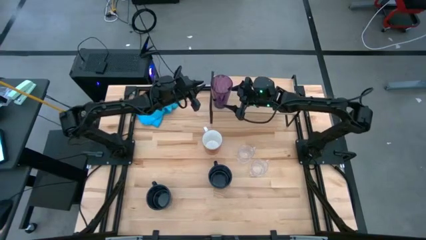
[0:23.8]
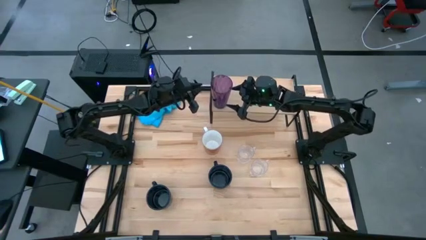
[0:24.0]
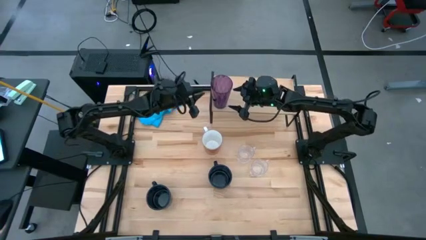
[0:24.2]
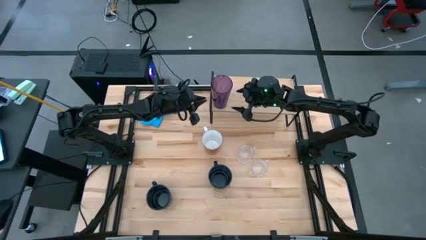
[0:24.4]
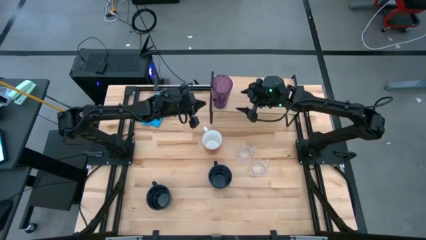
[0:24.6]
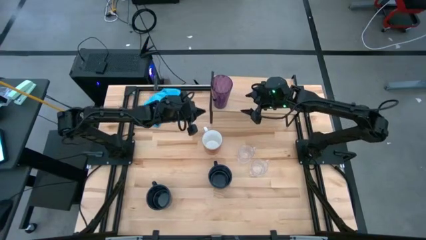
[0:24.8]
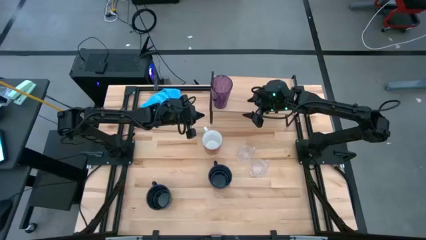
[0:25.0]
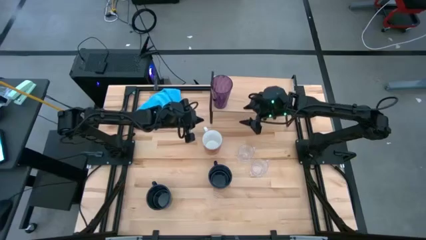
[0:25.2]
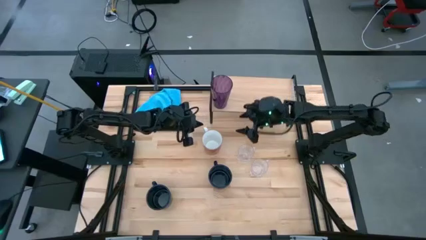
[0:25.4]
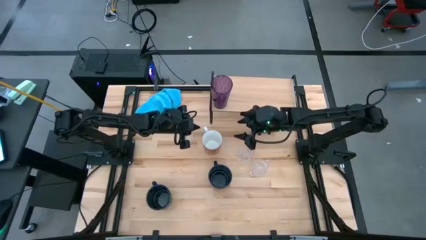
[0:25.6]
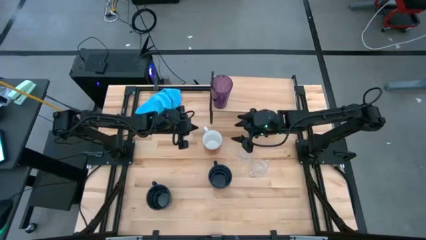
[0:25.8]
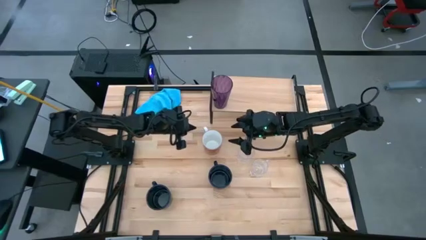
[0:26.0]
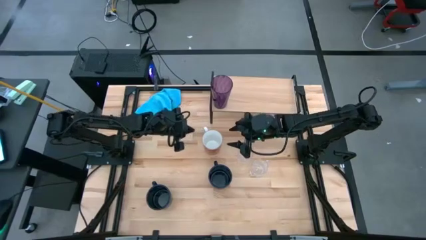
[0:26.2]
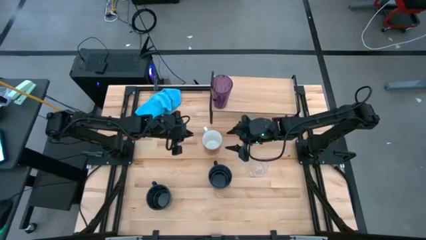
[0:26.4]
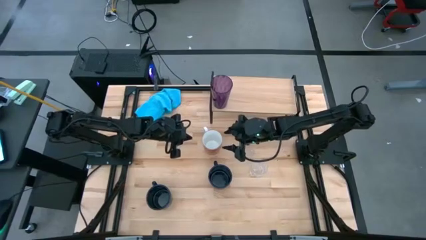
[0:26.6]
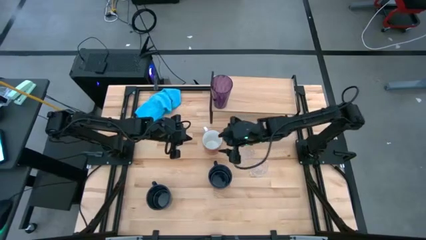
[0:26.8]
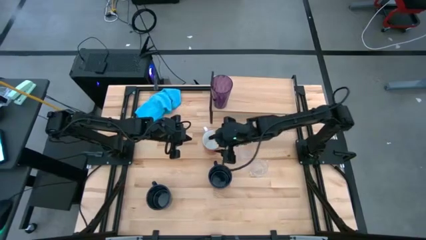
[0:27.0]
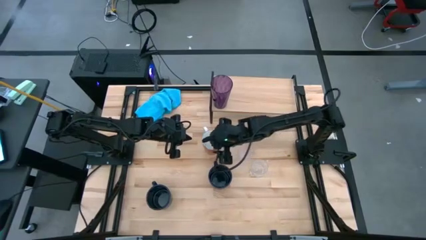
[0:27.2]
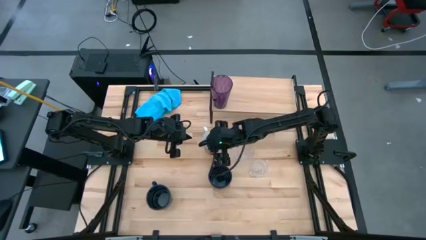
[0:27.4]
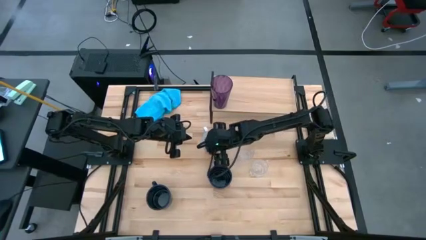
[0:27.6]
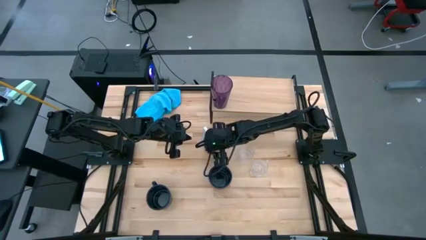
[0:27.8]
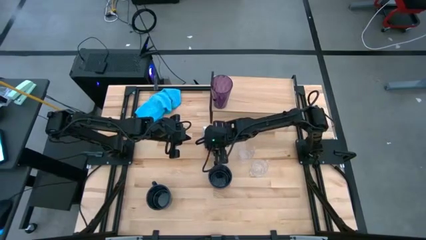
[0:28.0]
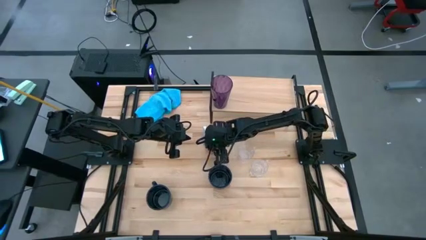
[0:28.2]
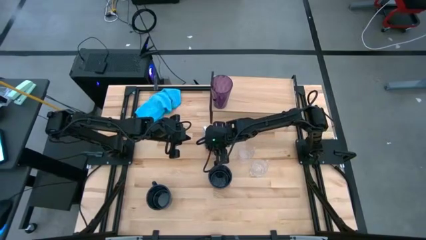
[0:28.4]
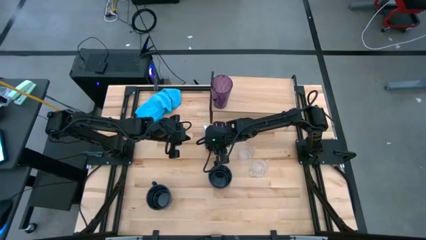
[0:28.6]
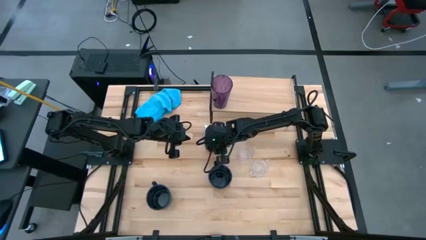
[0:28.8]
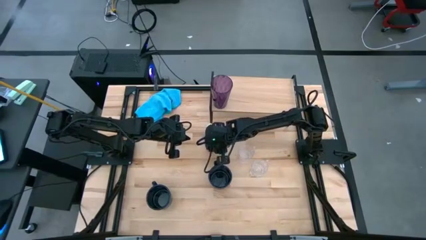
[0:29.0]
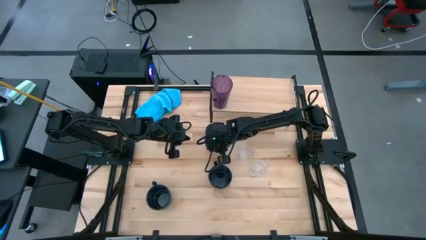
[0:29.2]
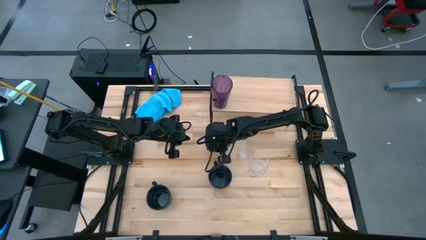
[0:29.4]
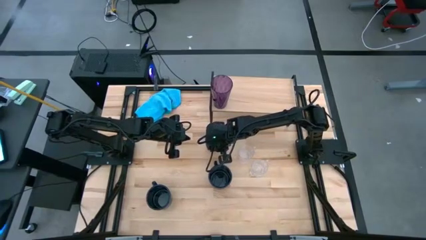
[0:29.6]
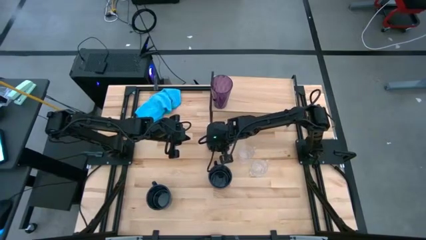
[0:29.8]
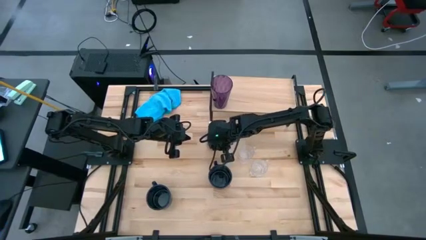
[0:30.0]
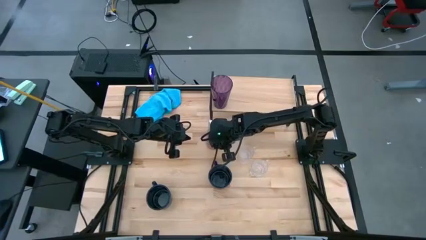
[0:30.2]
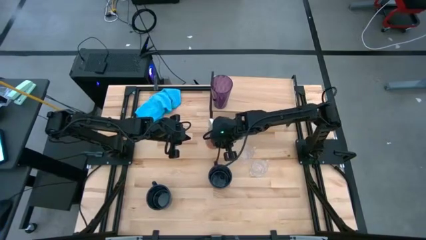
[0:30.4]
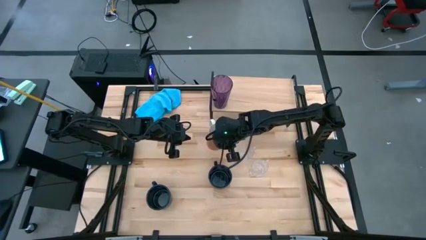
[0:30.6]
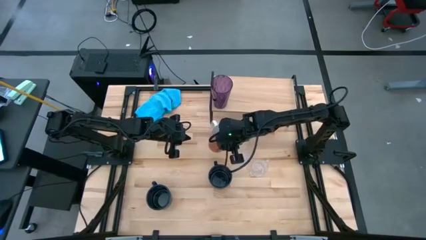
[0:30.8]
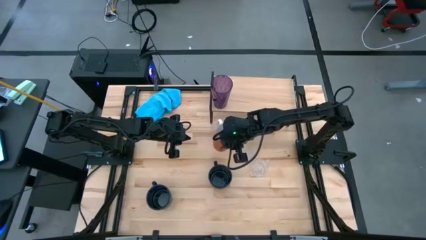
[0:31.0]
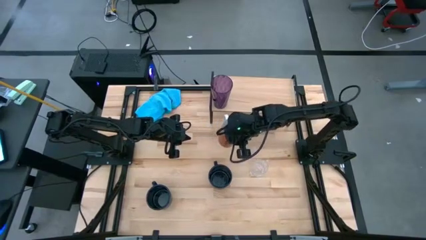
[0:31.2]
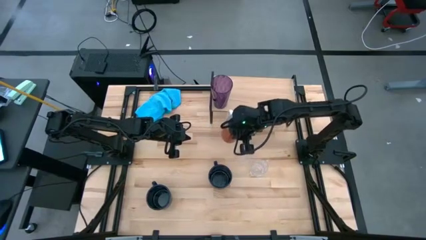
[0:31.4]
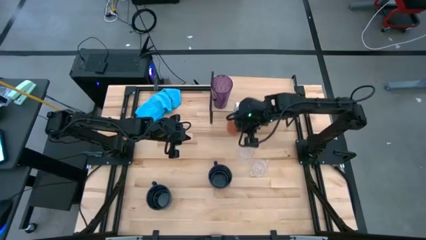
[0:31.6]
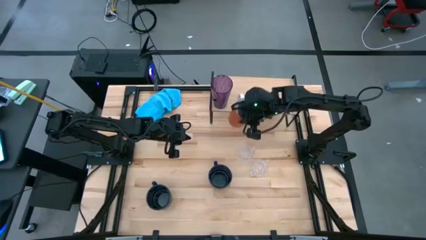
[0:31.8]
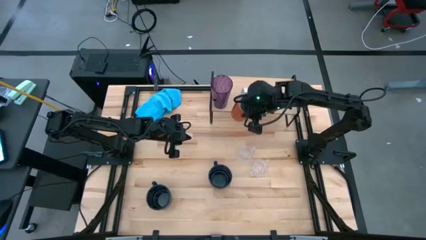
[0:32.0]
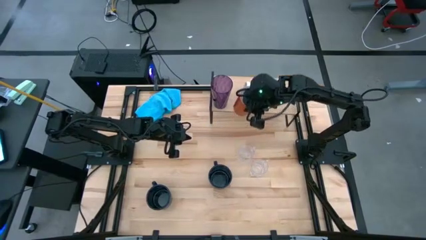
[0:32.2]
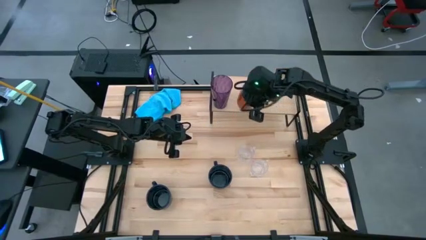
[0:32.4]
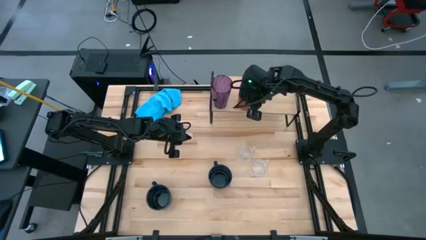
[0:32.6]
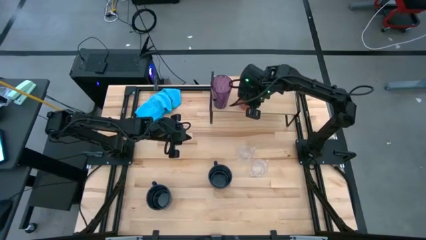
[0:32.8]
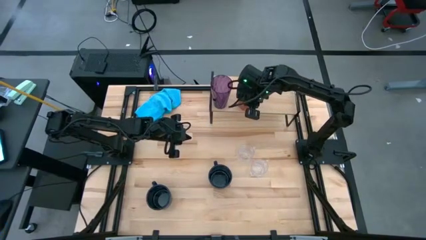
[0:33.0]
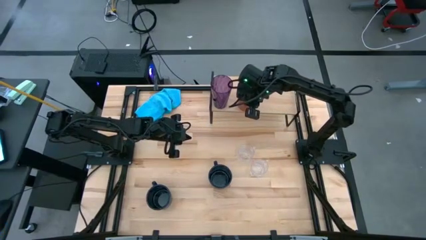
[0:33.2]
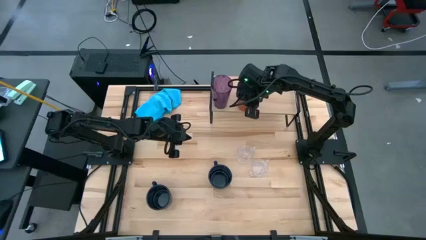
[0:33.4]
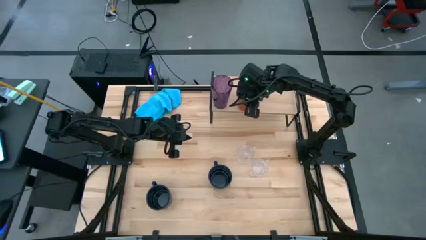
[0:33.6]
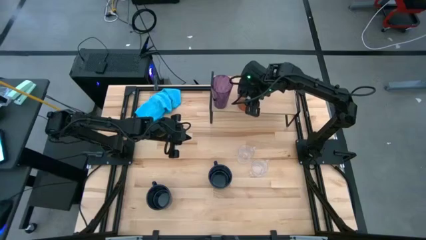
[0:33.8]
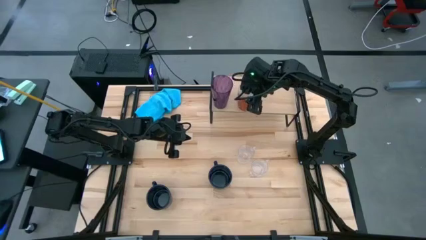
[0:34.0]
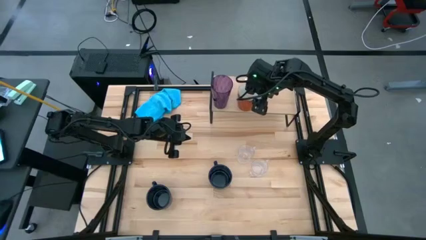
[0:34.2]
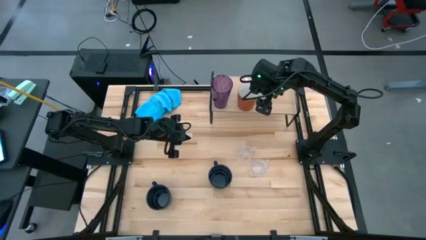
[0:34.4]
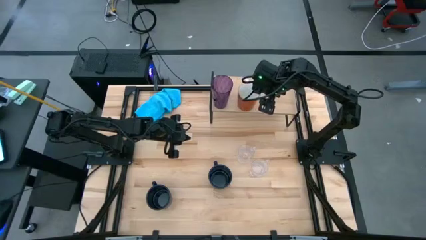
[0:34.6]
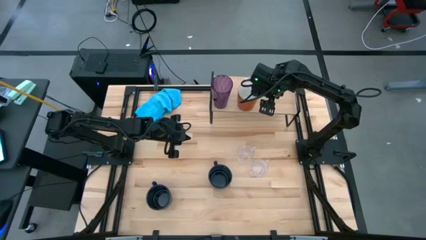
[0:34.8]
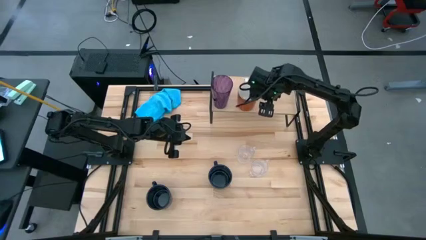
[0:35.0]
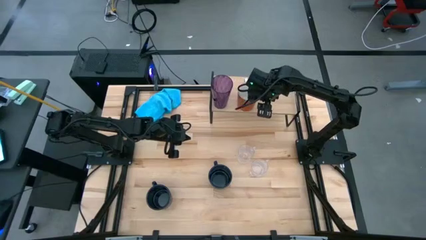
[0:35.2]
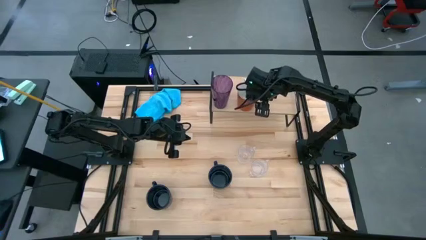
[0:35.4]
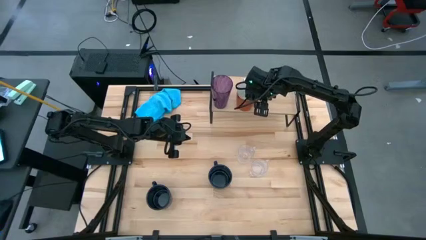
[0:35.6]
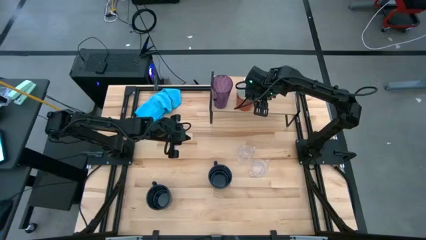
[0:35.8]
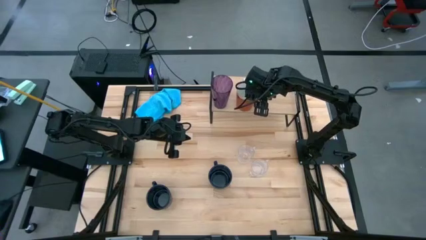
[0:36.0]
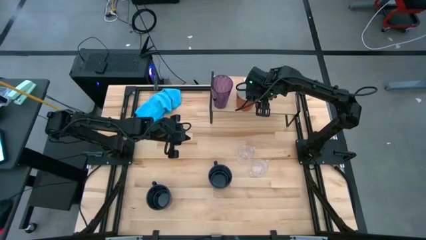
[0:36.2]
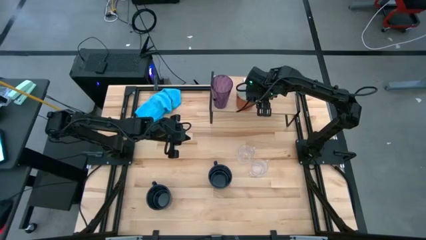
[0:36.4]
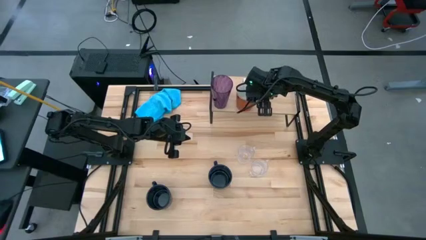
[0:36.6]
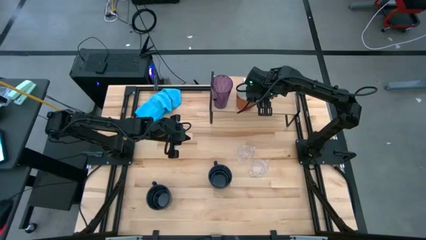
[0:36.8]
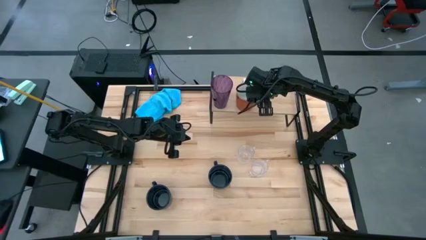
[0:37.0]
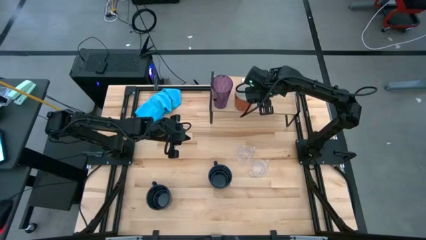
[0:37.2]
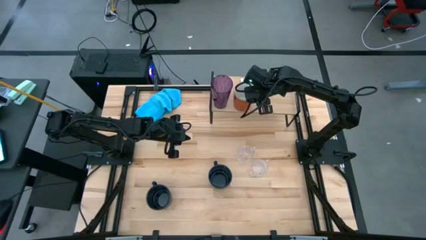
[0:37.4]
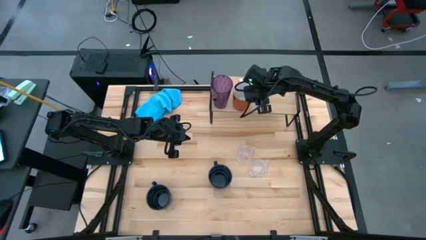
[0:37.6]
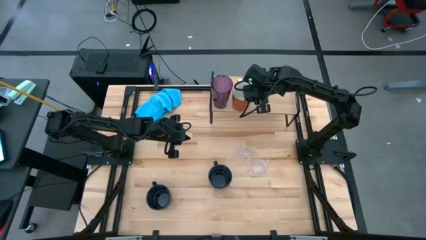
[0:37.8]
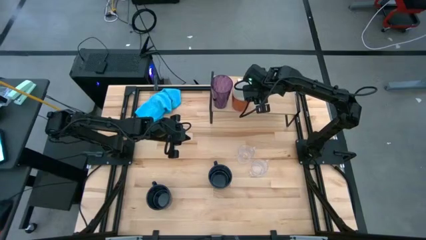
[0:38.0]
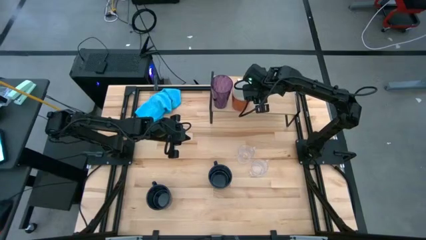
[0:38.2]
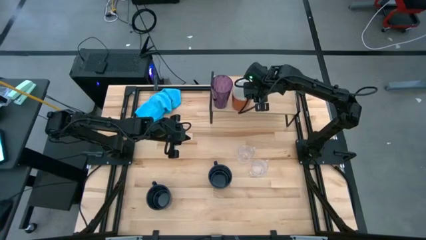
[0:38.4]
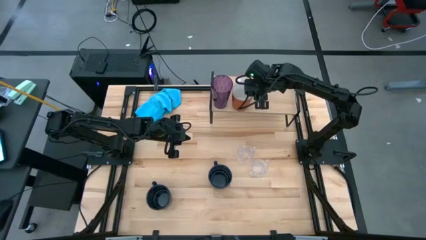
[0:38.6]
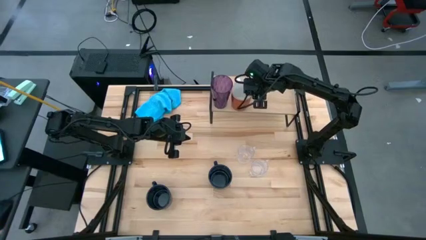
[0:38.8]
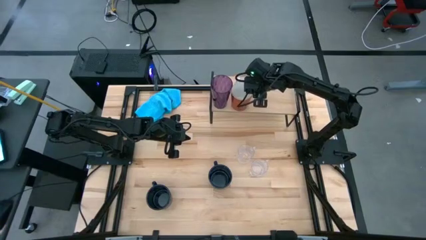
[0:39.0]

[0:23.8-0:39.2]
Task: Stack small to large cups/mugs on shelf
Put the orange mug on the shelf
